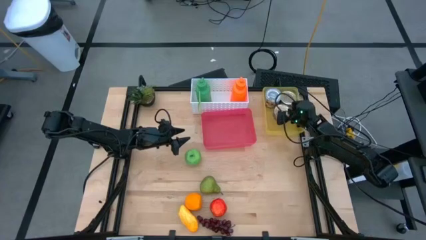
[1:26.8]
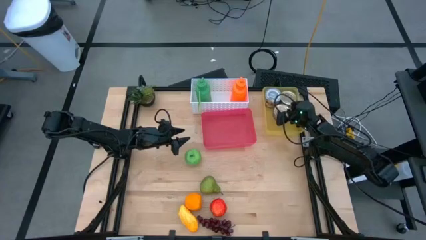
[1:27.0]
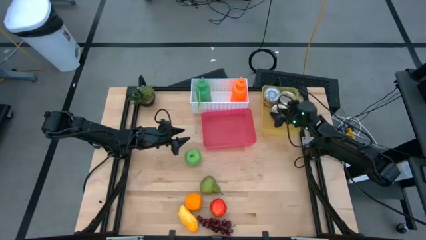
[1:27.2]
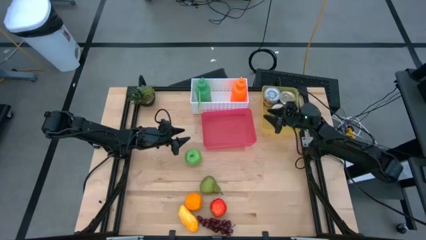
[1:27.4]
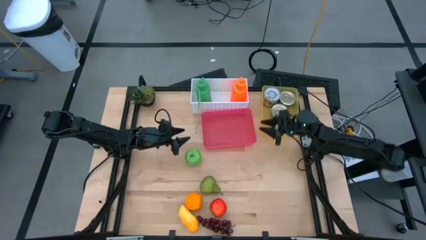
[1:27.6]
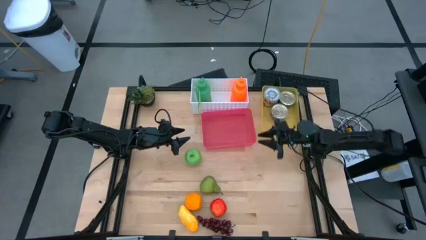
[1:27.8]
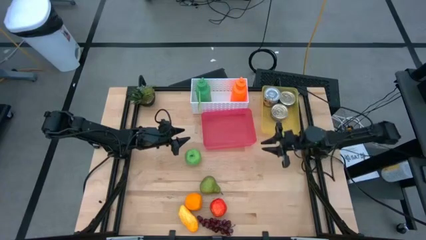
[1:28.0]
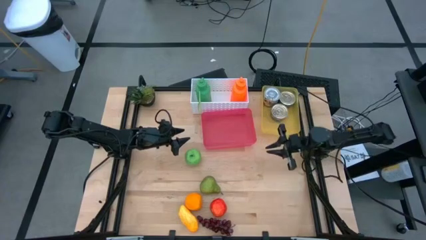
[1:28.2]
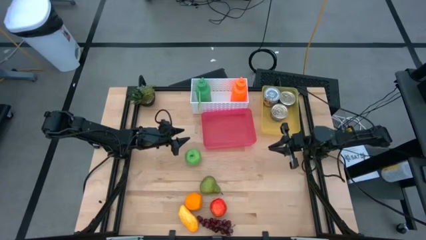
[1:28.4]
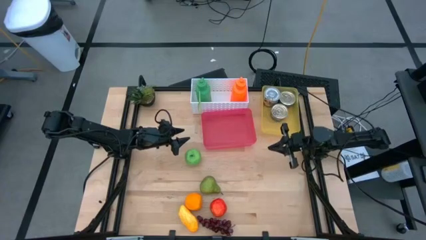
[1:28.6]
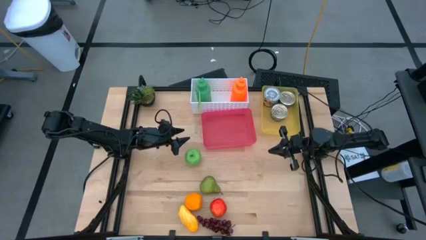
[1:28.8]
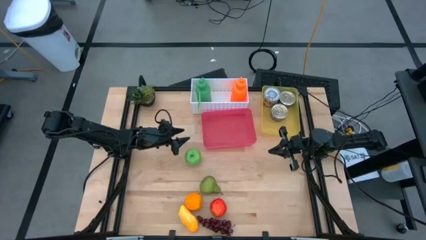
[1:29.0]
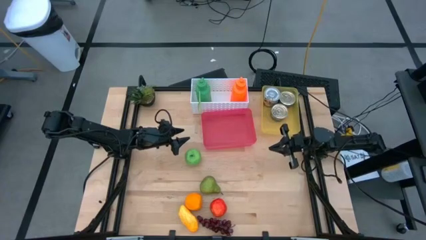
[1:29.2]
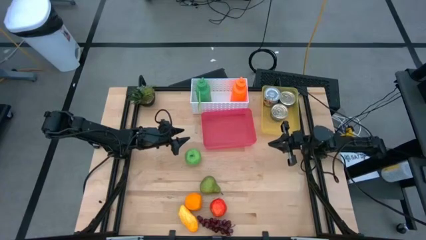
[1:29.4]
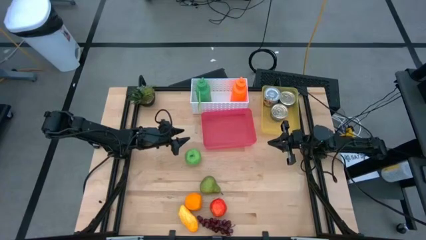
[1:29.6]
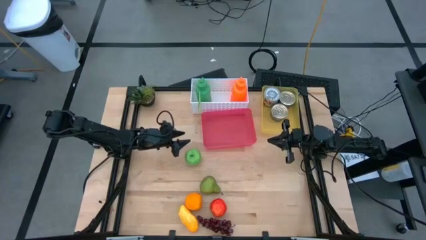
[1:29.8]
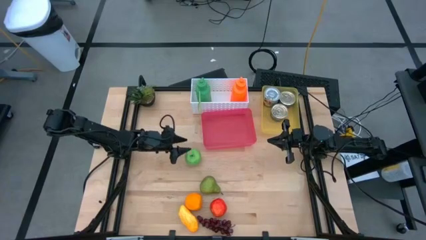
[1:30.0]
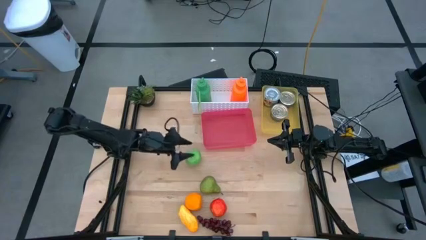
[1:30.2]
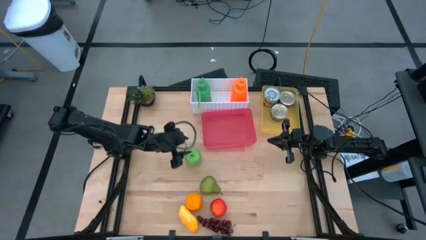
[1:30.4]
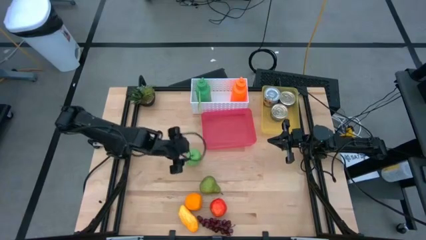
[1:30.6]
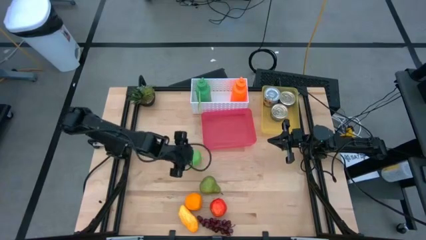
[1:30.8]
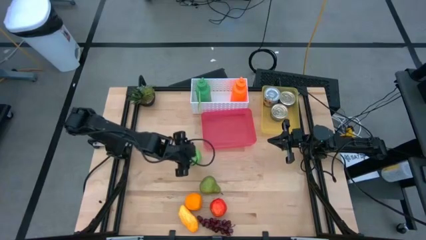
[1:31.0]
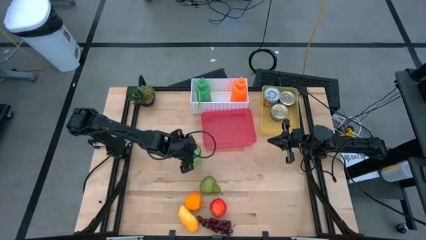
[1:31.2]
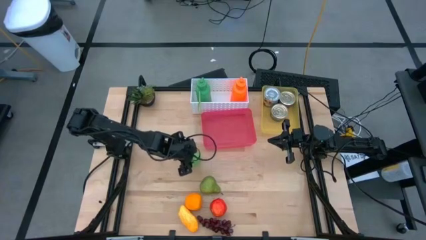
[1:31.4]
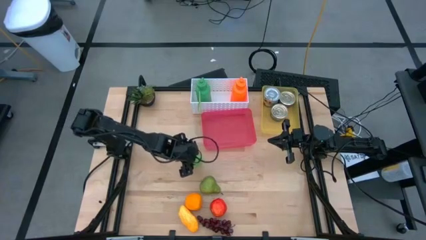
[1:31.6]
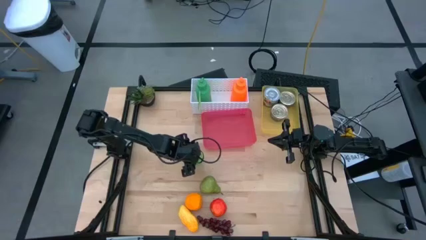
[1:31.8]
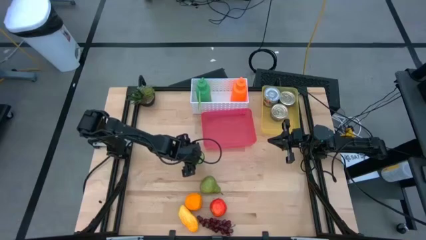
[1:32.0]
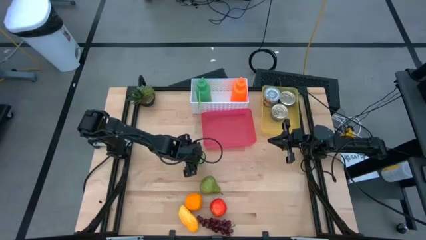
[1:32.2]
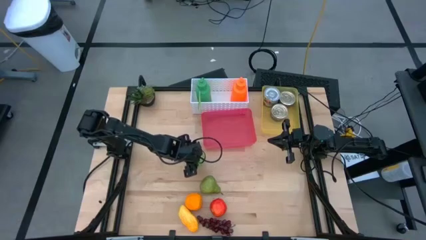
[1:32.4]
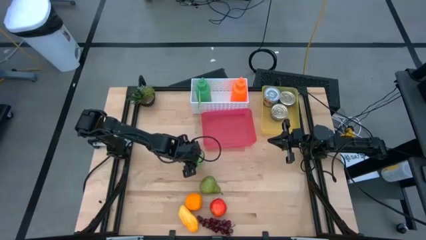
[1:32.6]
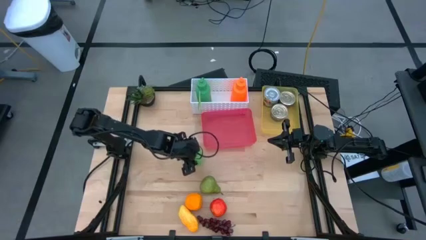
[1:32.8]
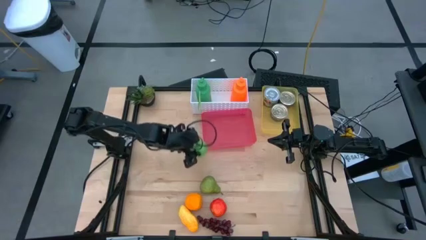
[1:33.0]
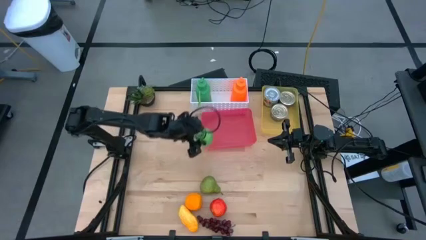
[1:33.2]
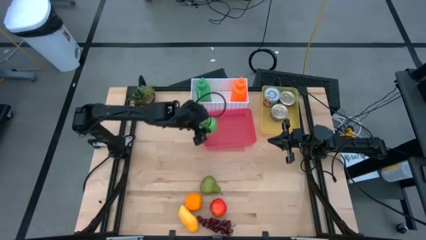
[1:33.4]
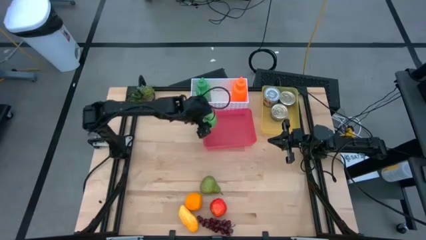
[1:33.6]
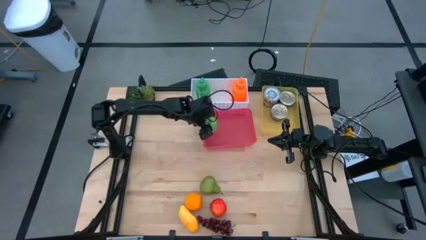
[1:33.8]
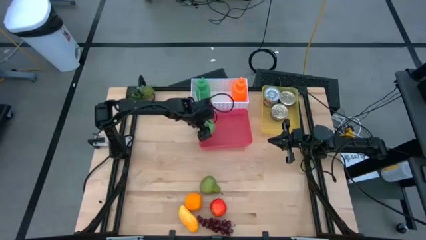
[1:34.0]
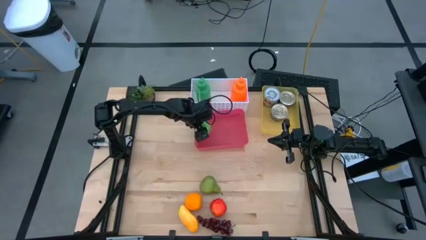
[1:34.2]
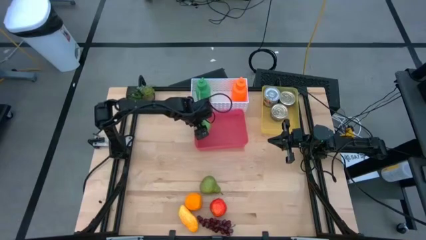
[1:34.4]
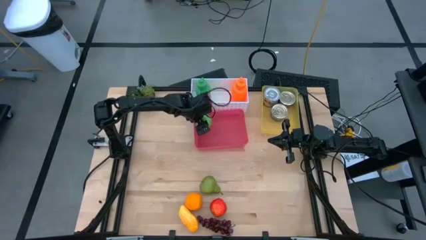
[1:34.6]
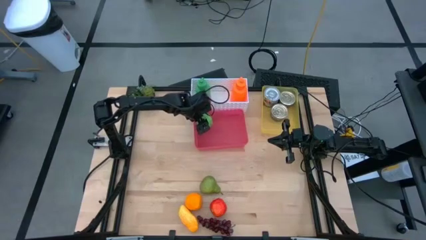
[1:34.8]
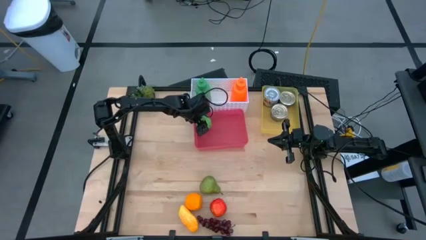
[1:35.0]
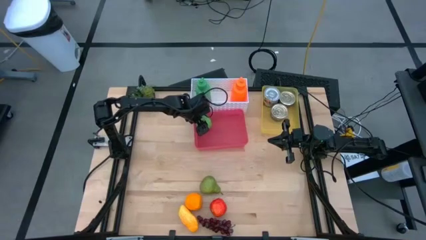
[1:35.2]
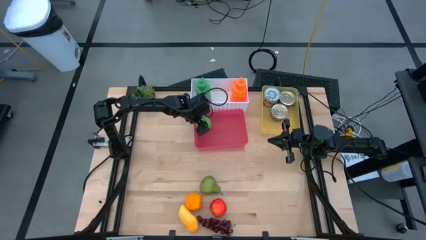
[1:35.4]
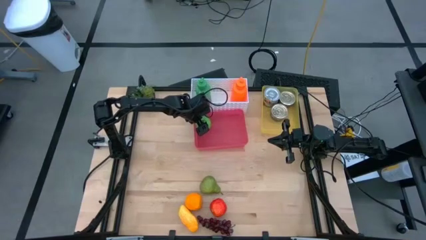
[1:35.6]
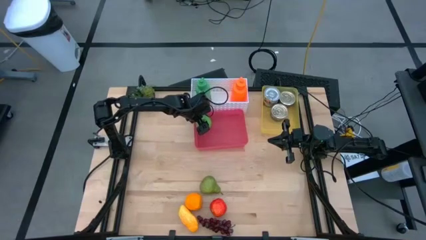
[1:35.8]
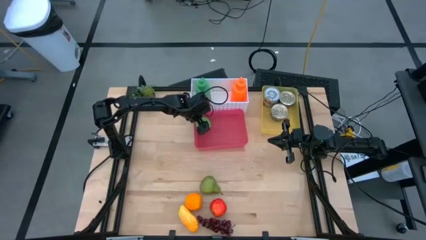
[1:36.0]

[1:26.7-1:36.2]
Task: Pick & Place Food Item
Put the green apple into the red bin

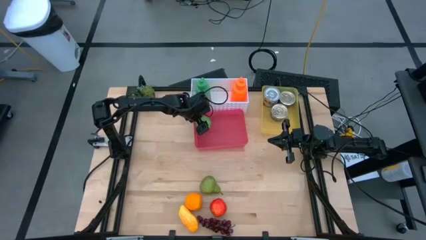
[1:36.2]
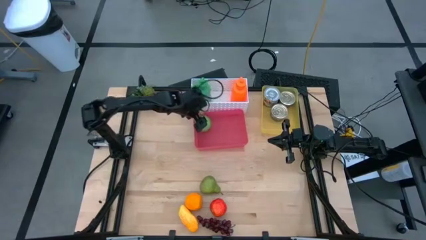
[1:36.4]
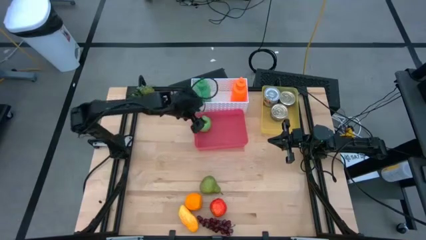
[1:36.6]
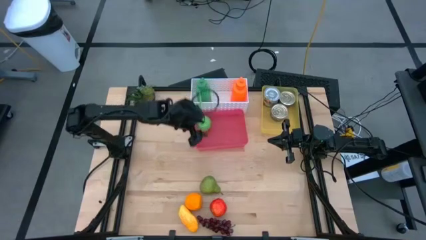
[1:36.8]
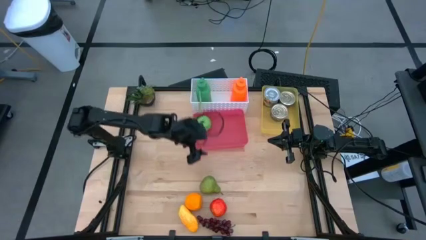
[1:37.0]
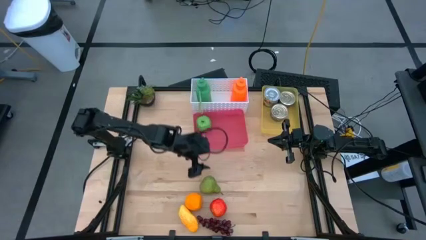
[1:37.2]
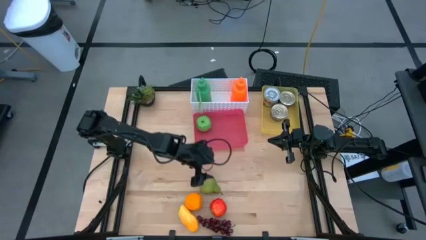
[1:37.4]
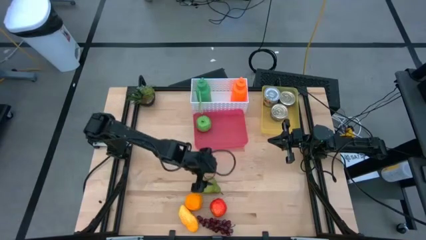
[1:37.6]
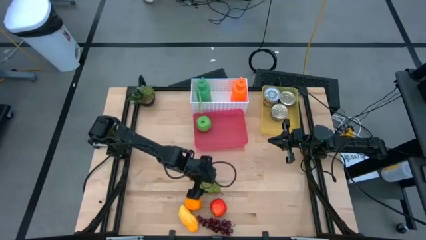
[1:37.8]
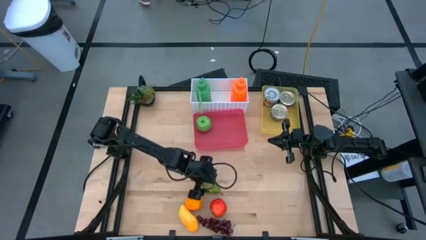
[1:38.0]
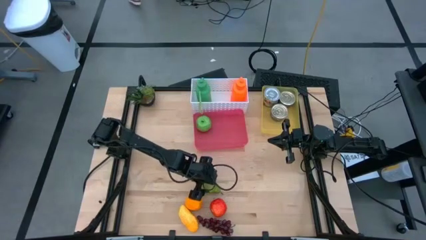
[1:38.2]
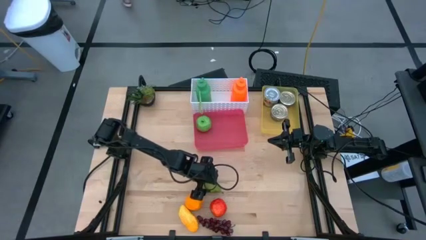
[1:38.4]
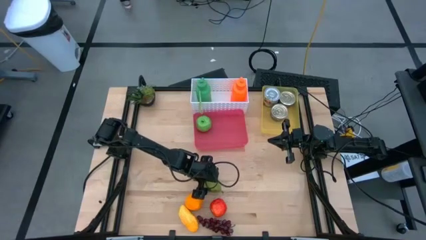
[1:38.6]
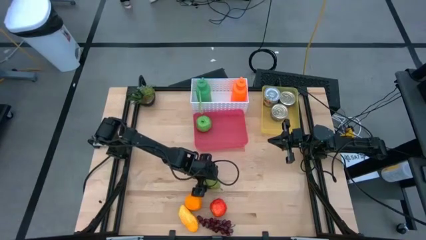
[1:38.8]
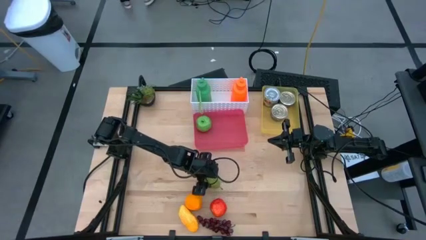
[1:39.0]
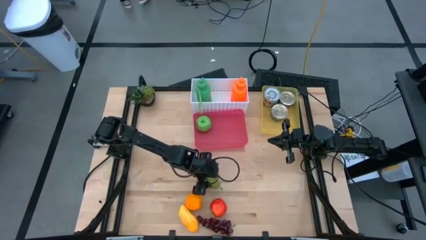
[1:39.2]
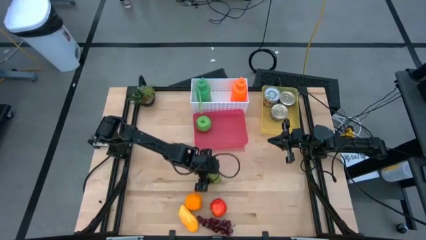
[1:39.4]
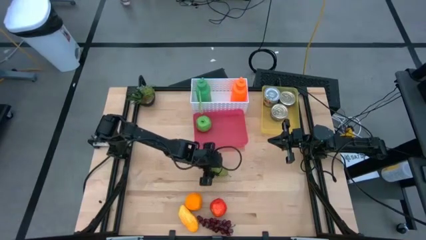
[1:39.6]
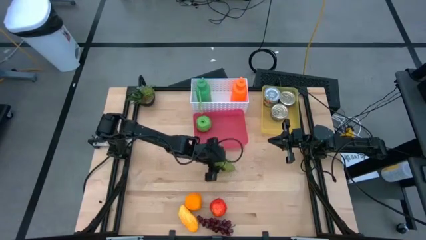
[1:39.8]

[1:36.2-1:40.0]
Put the green pear into the red bin
